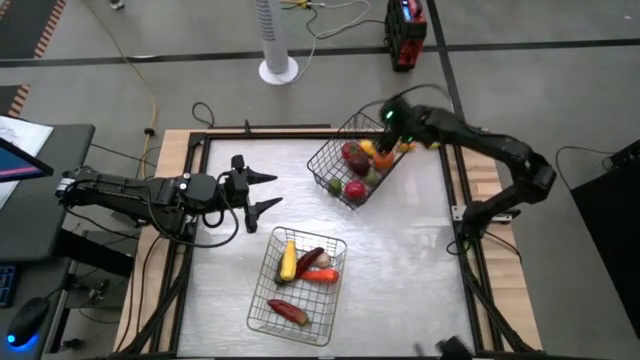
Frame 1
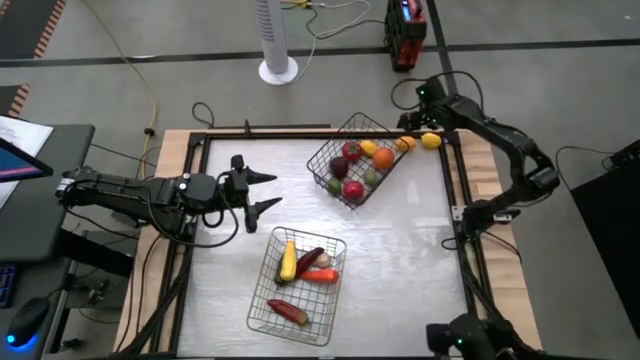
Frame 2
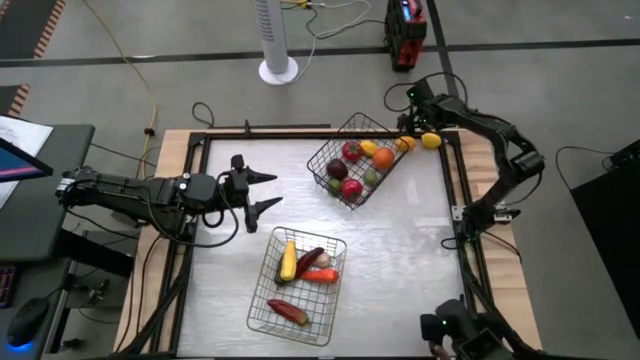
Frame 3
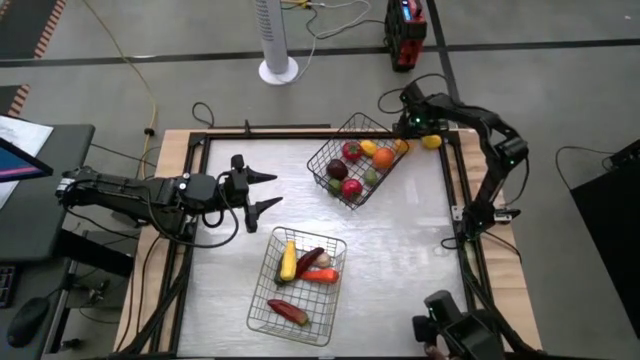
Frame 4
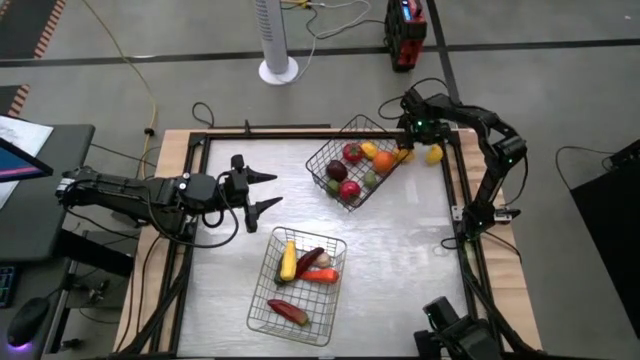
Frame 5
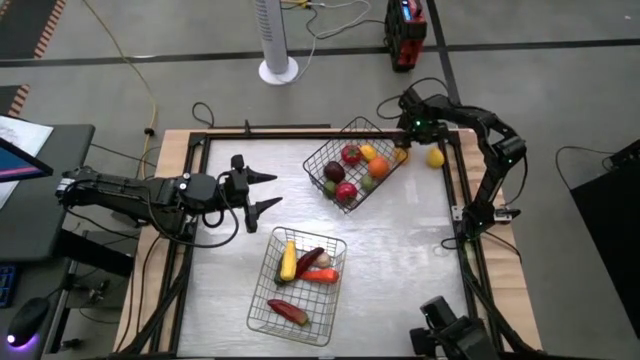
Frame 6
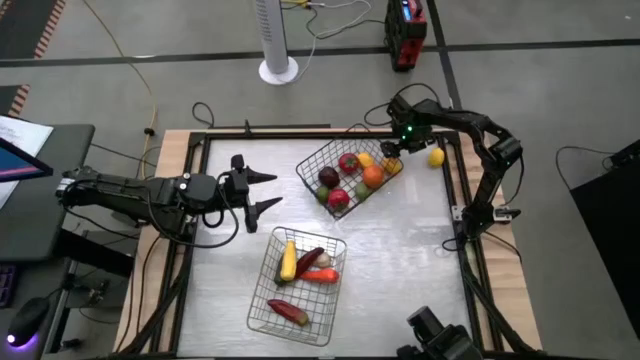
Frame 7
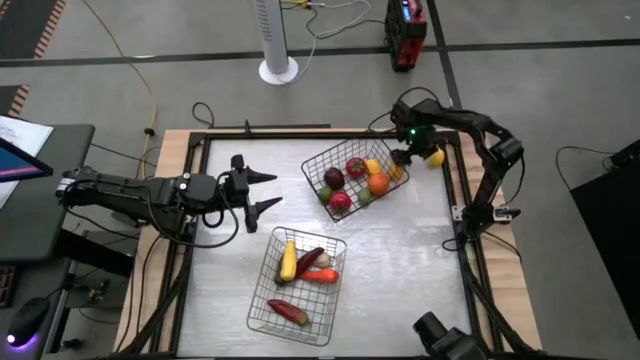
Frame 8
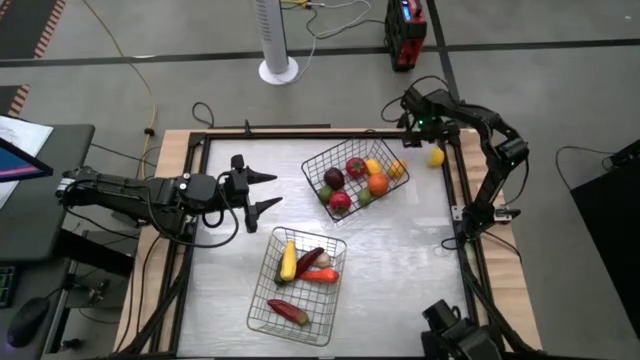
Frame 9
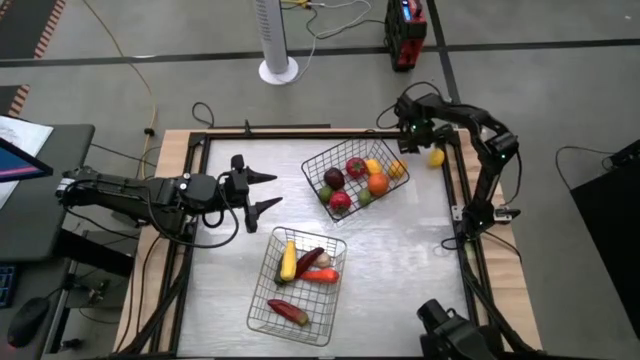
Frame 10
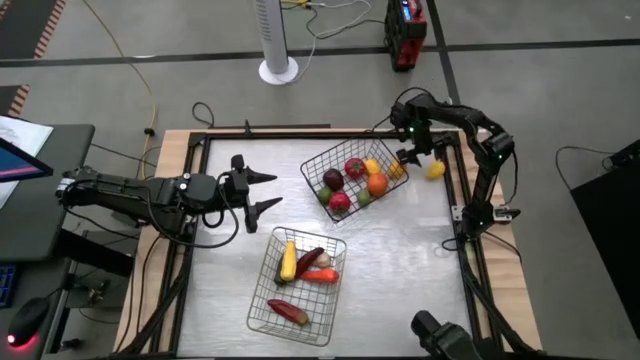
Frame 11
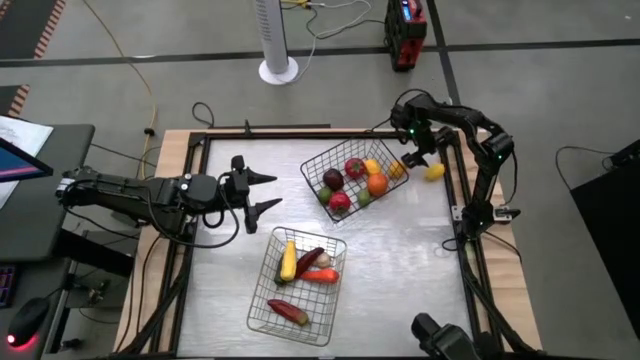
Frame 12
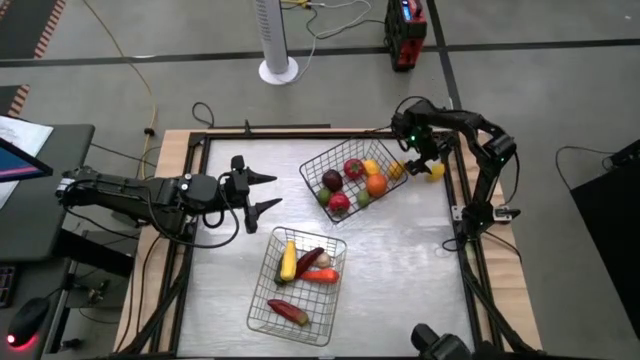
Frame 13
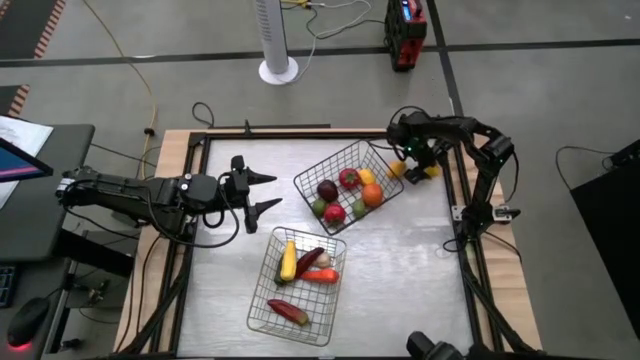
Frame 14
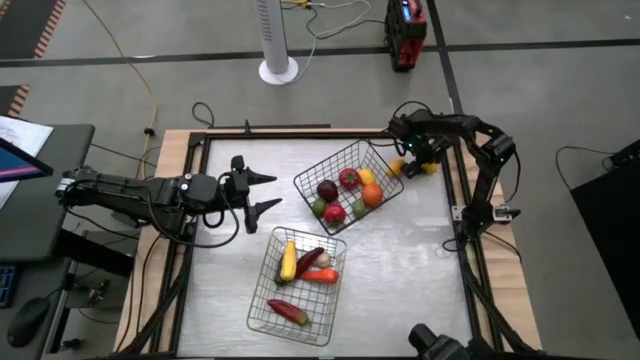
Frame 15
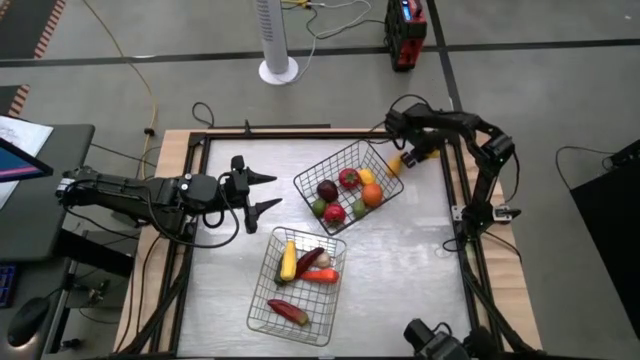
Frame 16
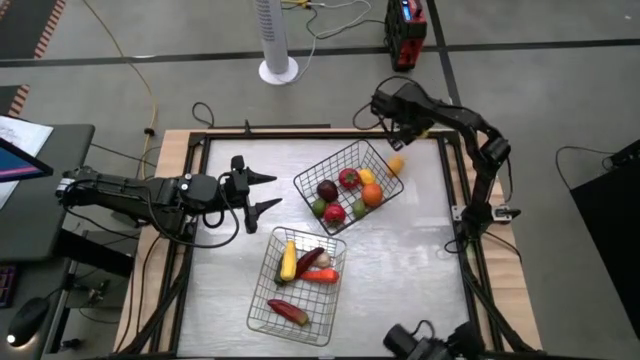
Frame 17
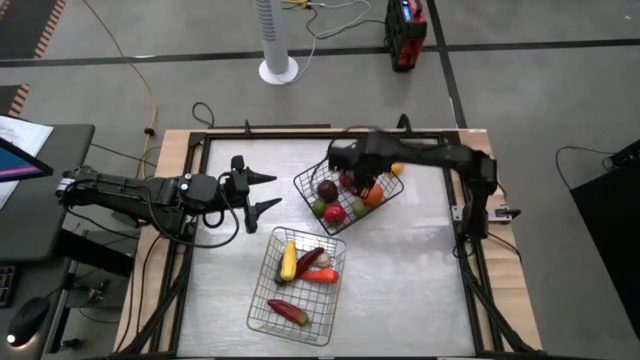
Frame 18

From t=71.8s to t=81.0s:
Task: Sort produce into baskets
Put the right yellow lemon into the black wire basket

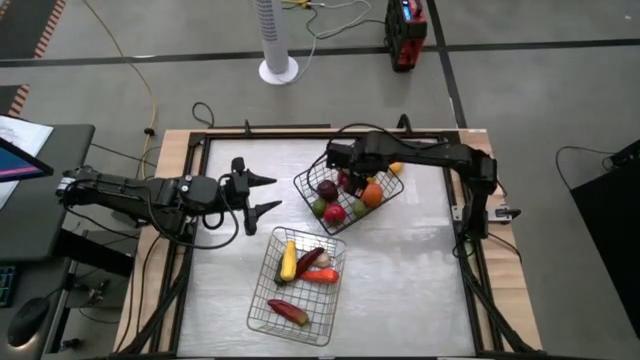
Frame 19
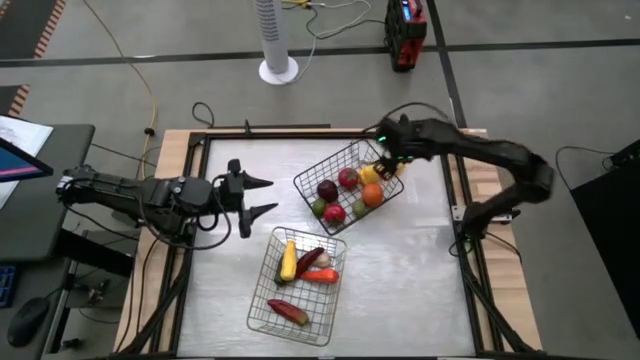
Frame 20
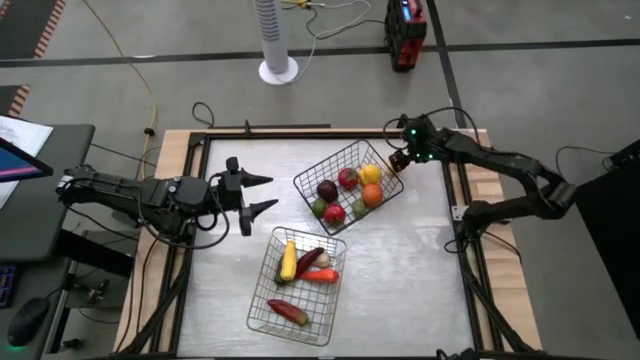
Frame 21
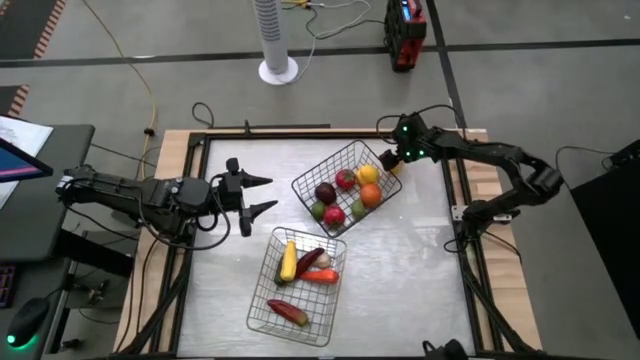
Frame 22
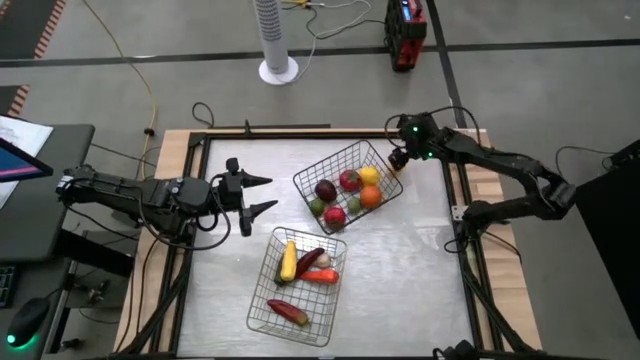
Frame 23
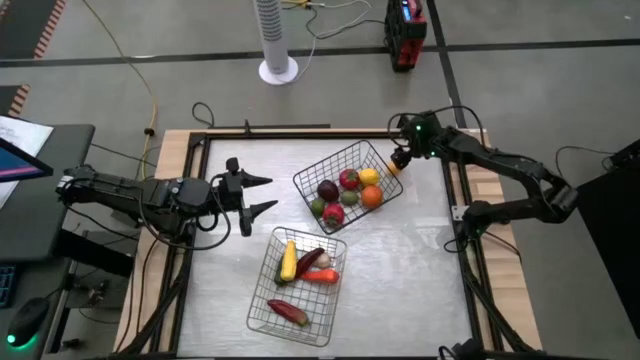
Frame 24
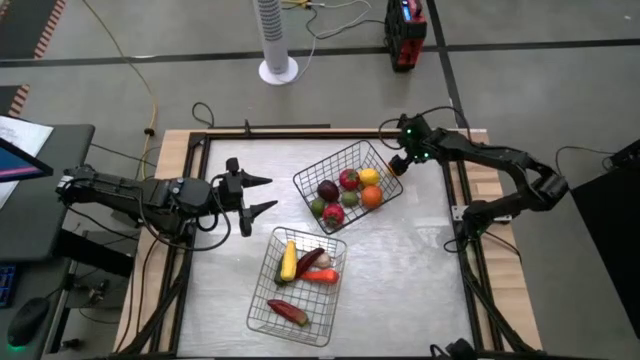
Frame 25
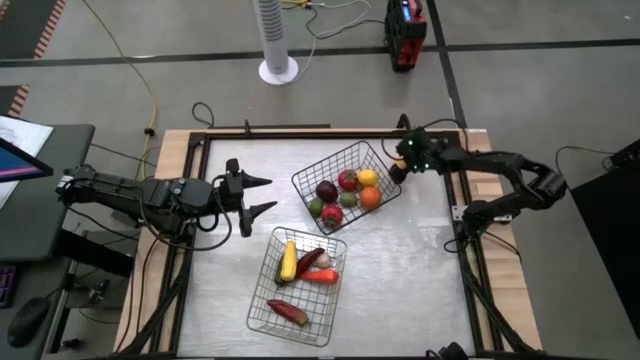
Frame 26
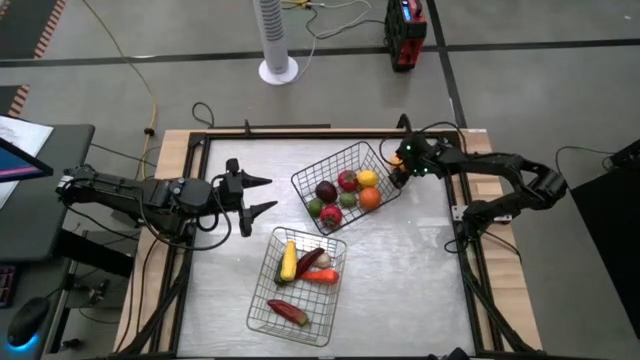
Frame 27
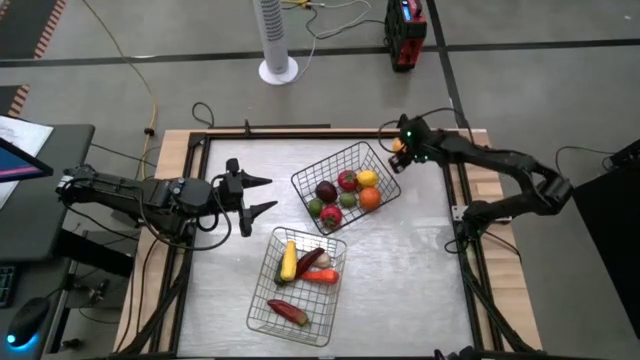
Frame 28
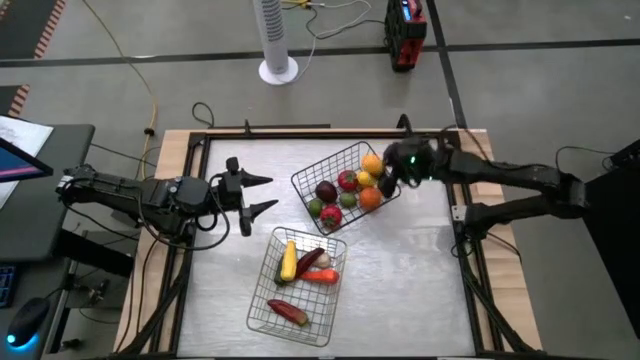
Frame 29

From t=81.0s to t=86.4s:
Put the yellow lemon into the black wire basket

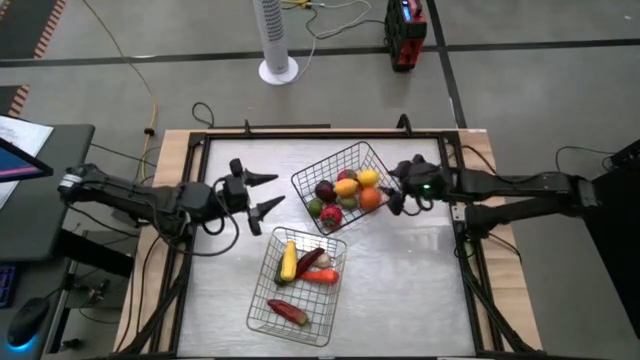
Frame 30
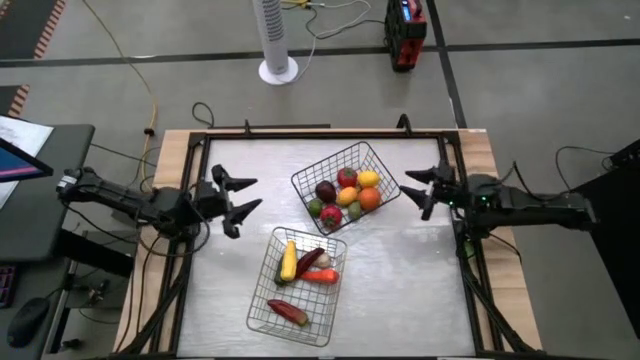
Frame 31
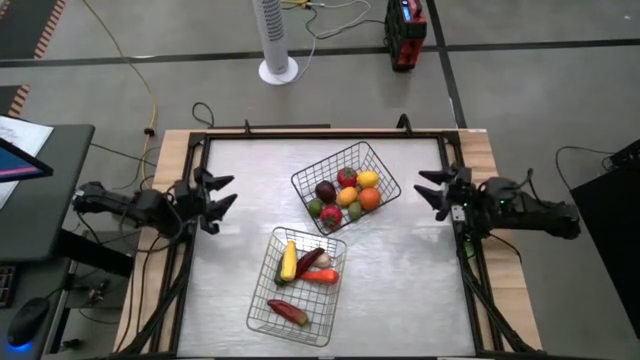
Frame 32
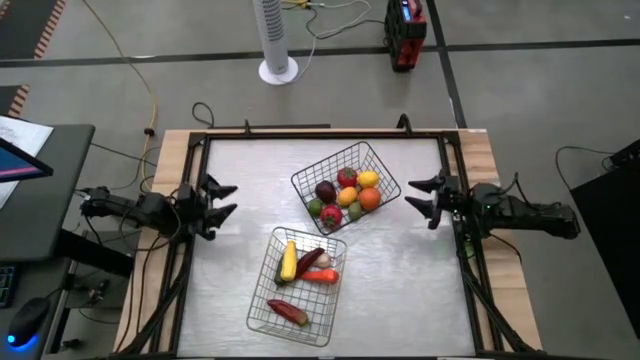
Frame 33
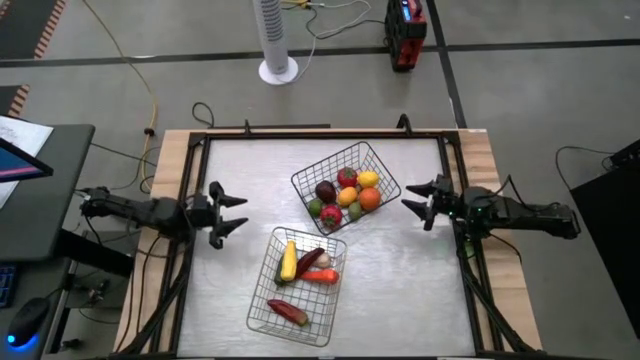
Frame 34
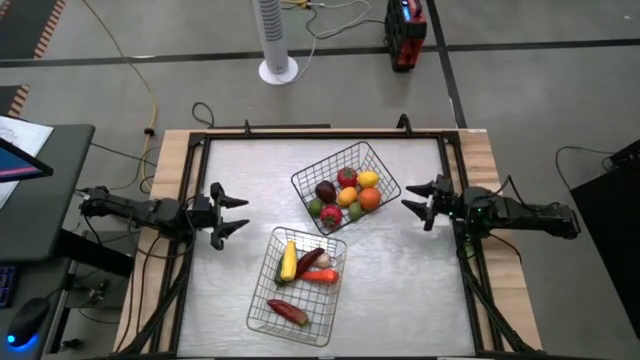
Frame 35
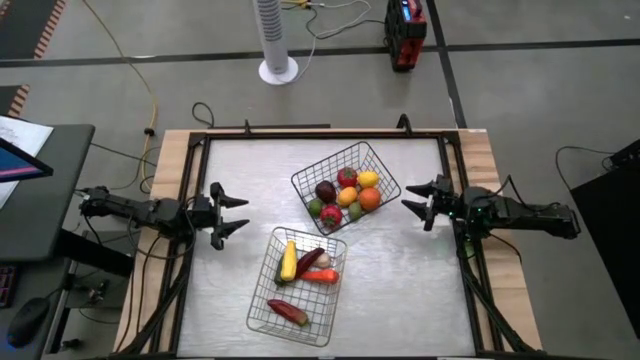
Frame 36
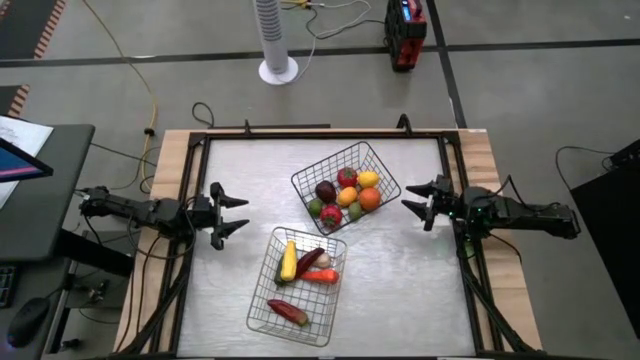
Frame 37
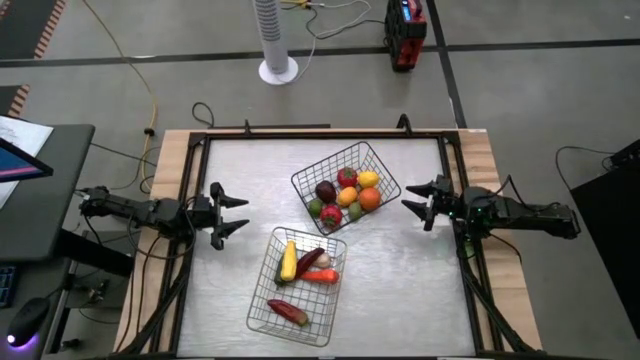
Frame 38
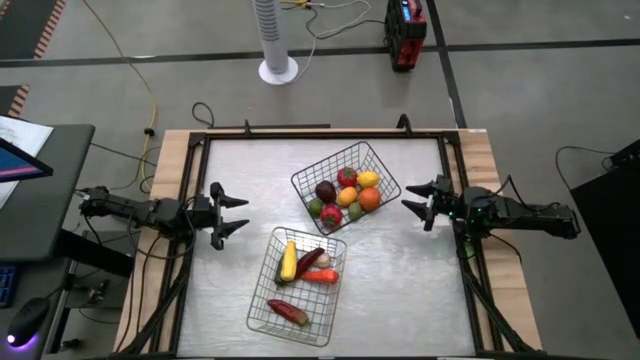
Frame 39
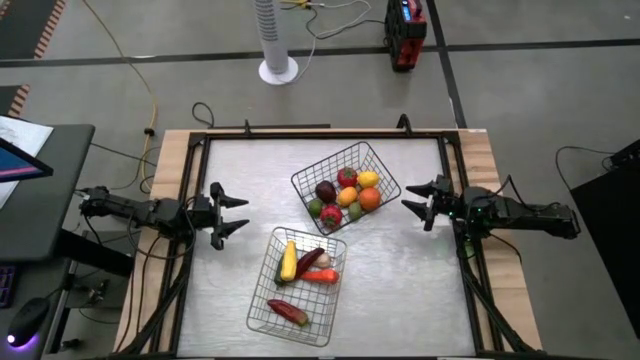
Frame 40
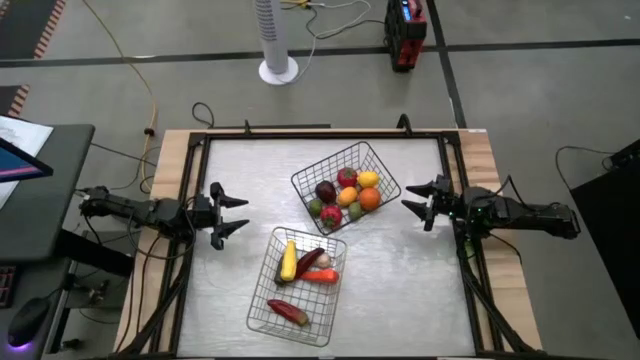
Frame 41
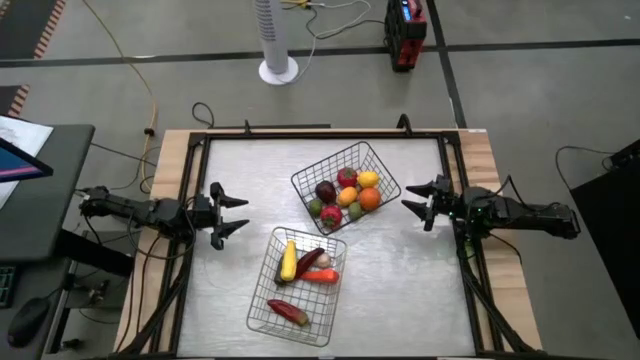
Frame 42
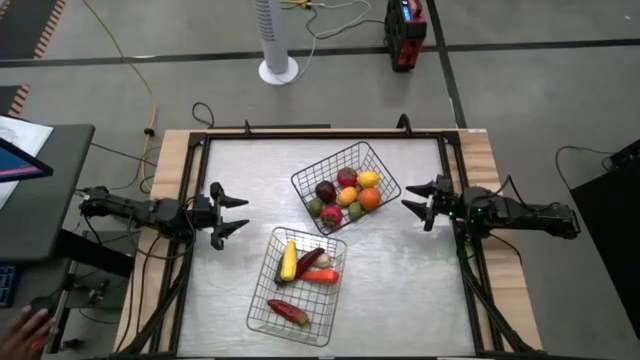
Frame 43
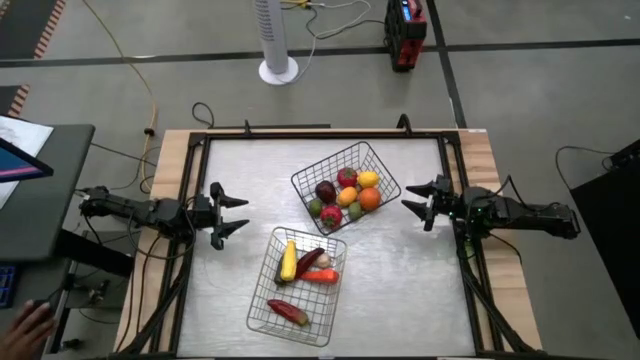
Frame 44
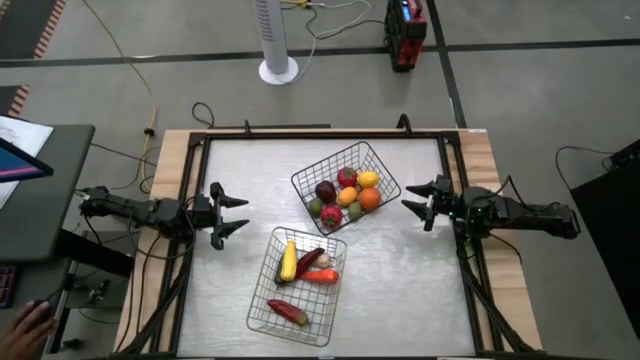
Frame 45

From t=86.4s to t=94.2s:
Return to Home Position
